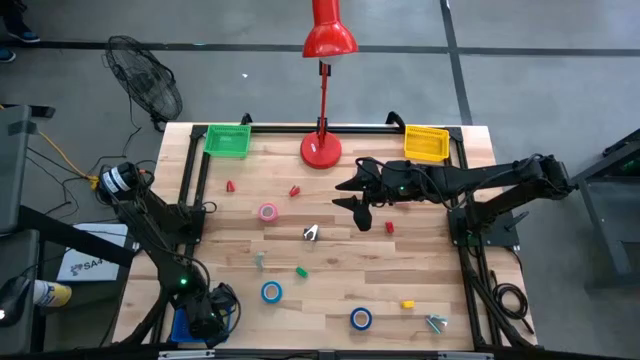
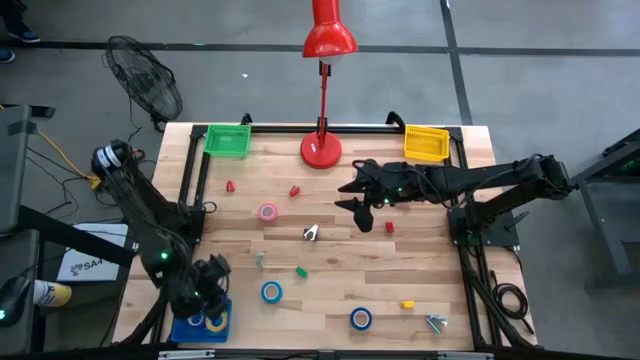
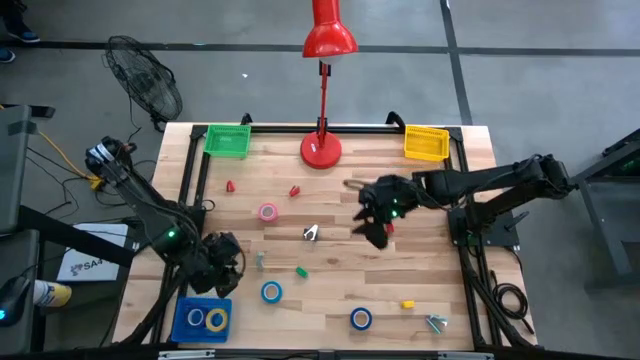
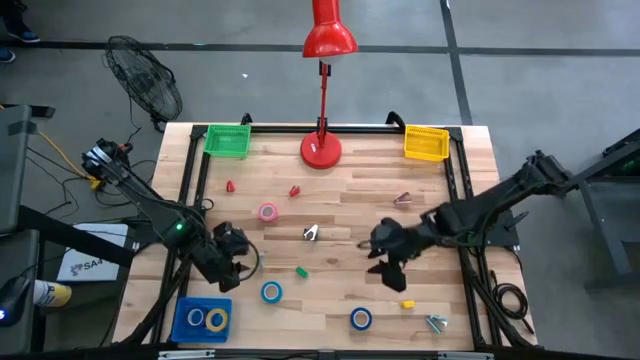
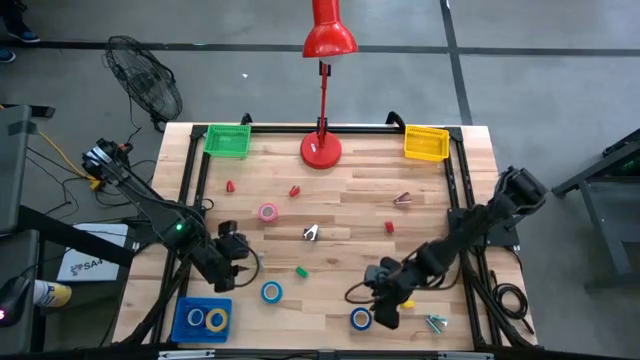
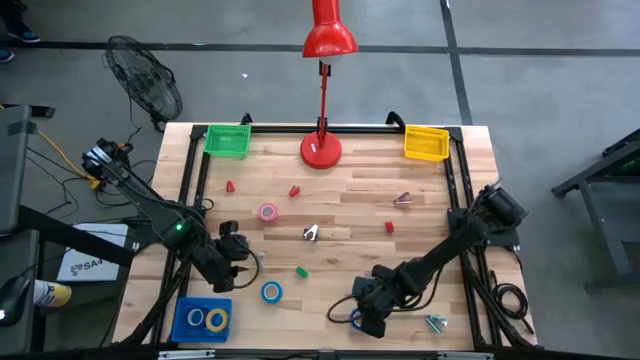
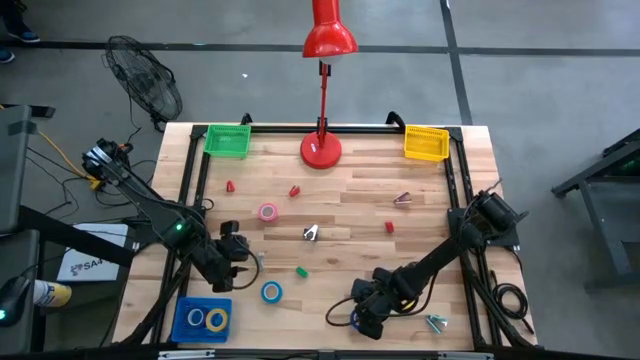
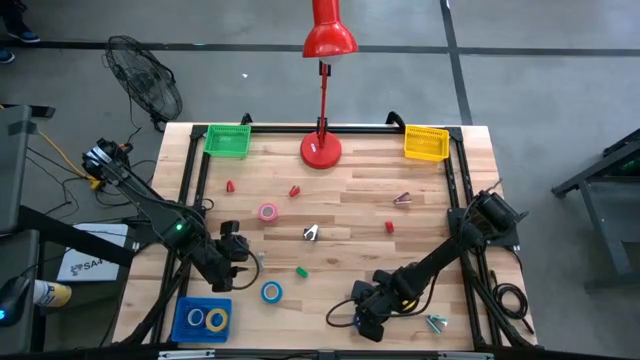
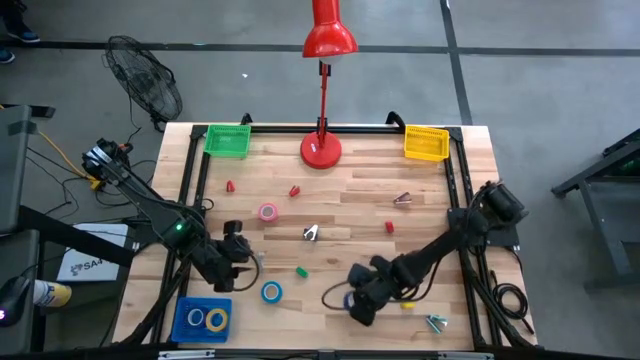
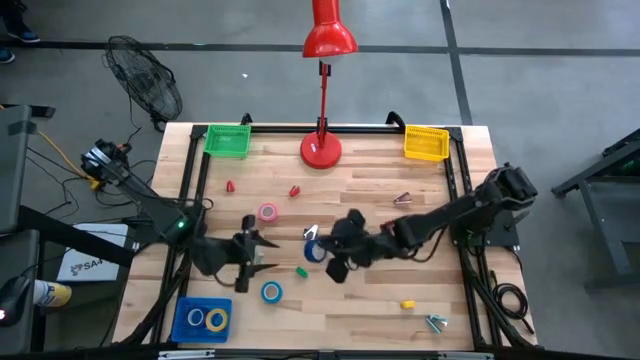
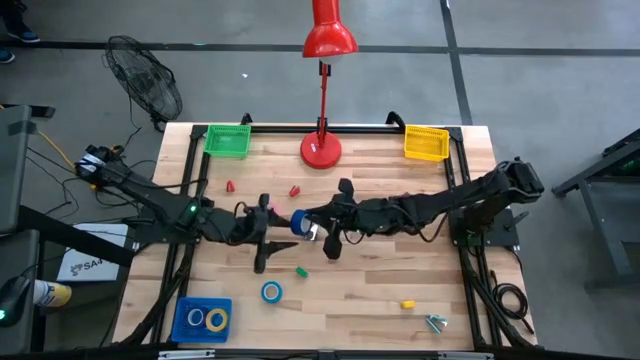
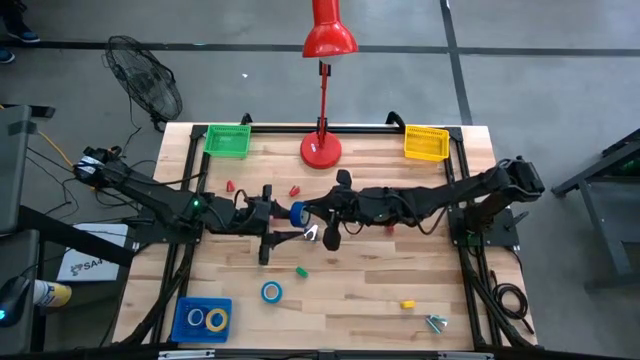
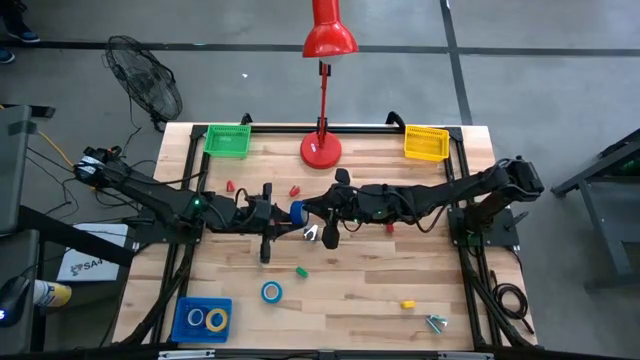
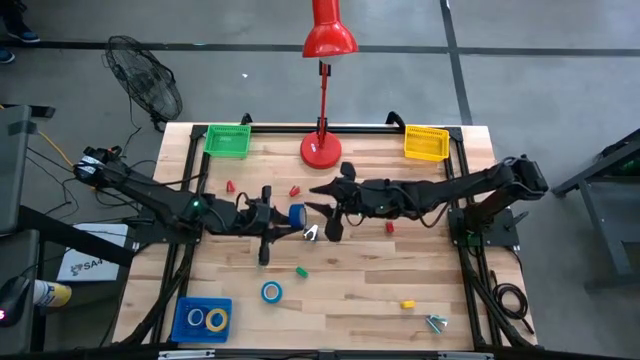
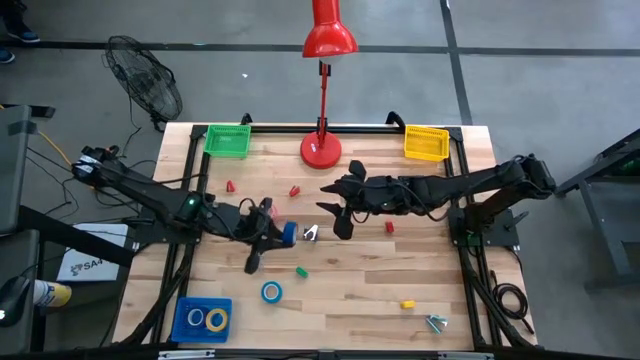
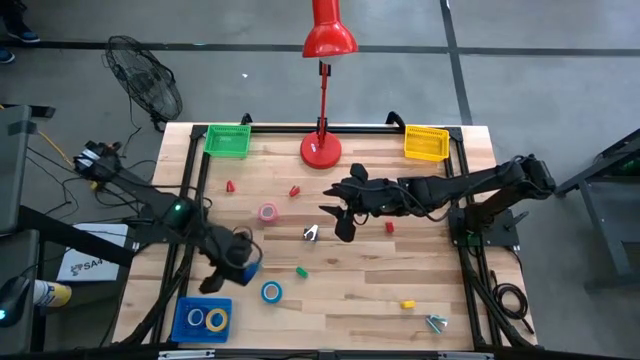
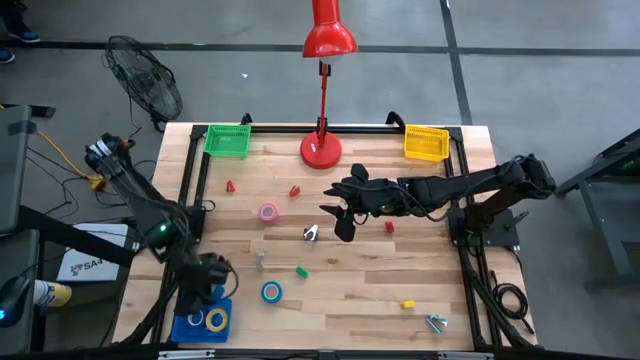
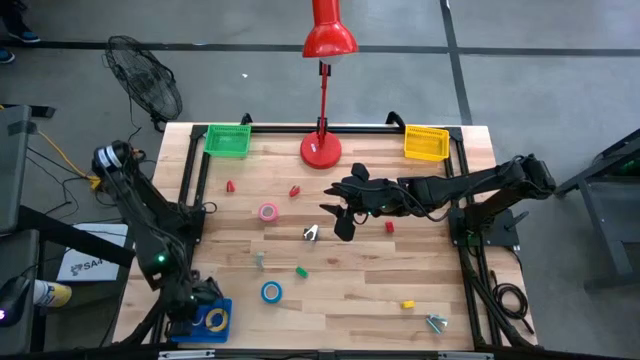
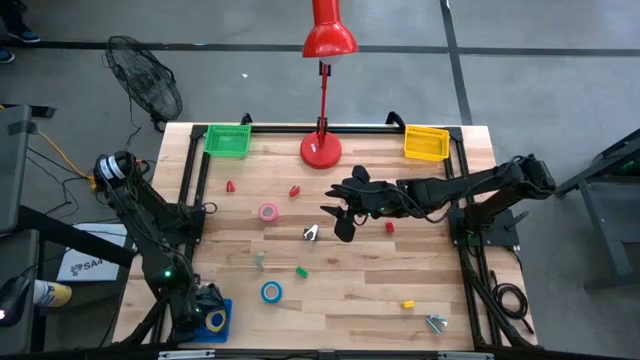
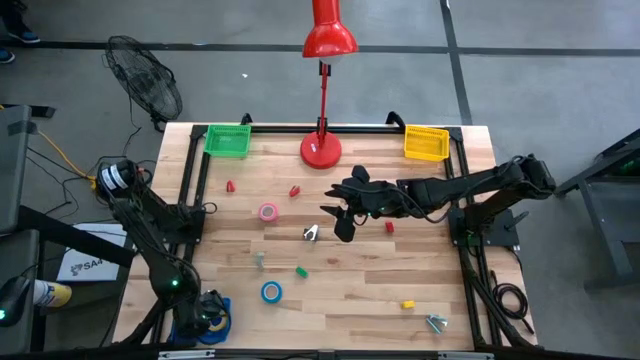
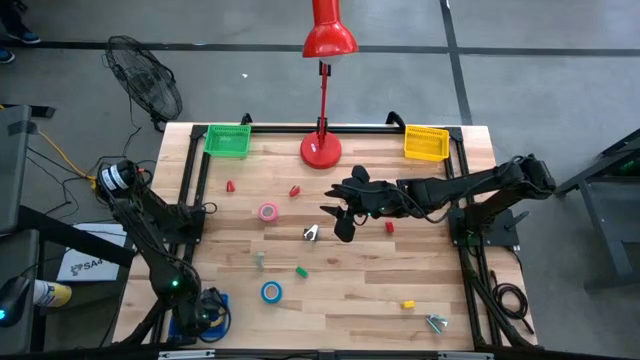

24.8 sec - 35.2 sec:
Task: Pick and place Stapler, Stapler remover, tape
Put the blue tape into the blue basket

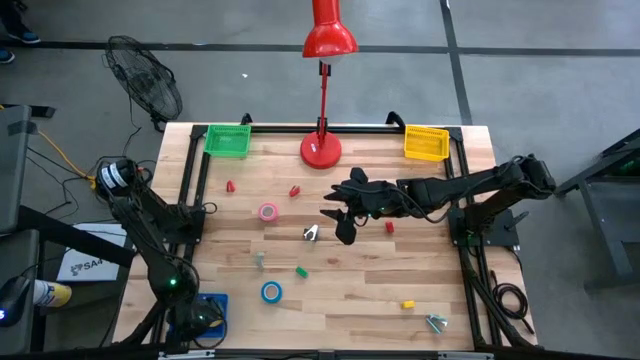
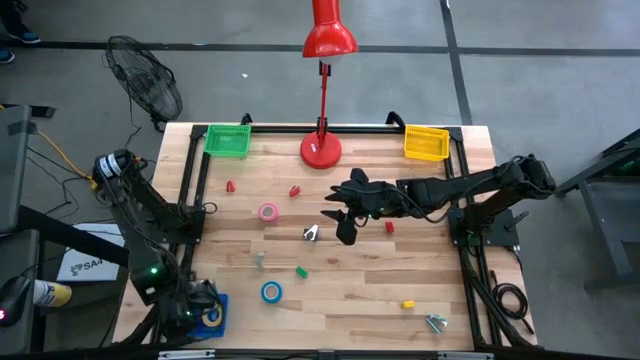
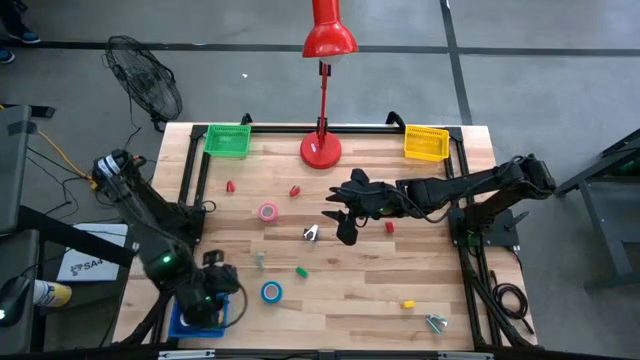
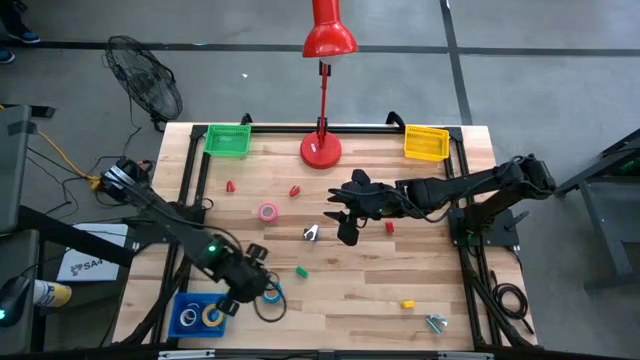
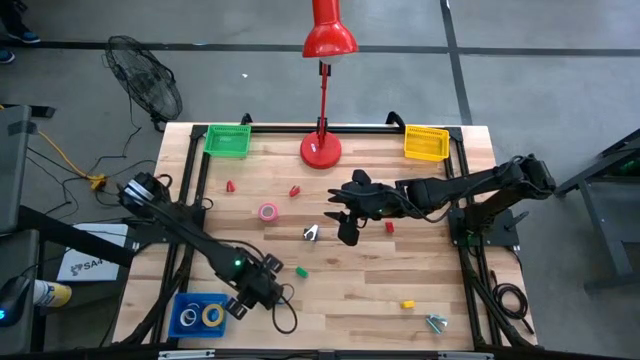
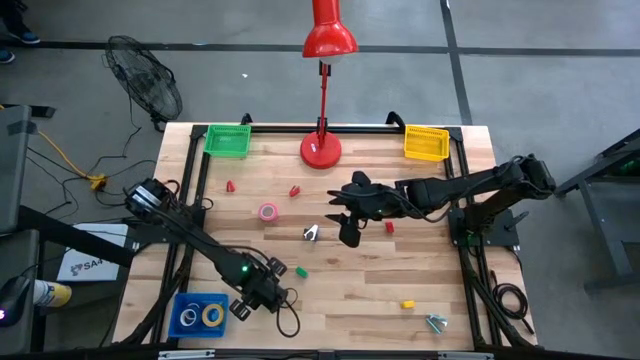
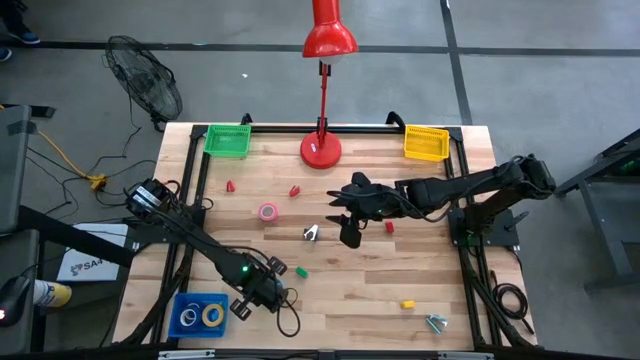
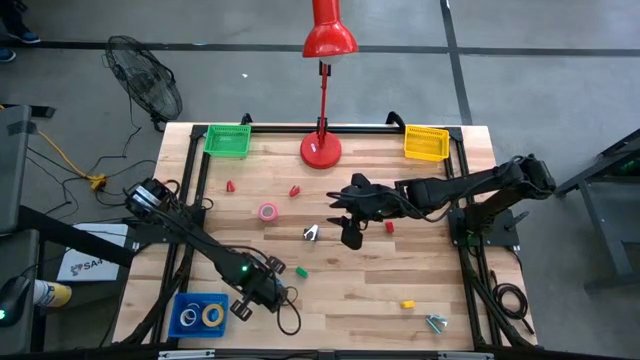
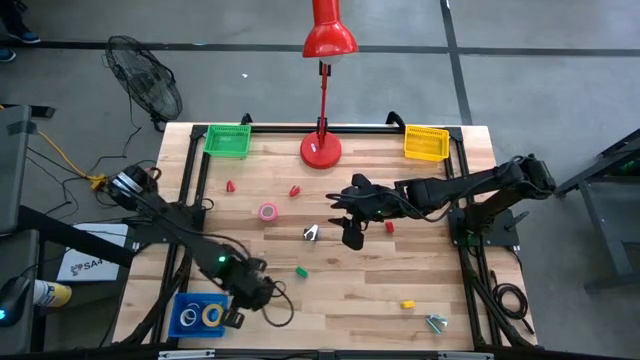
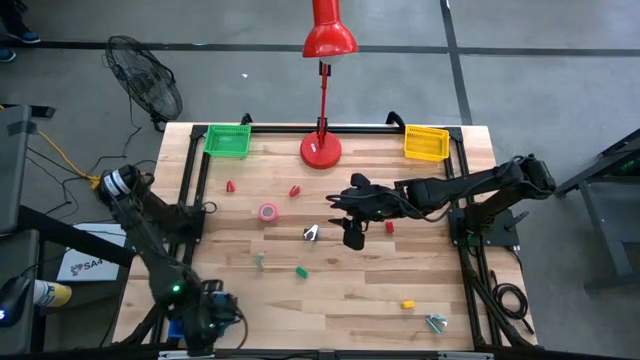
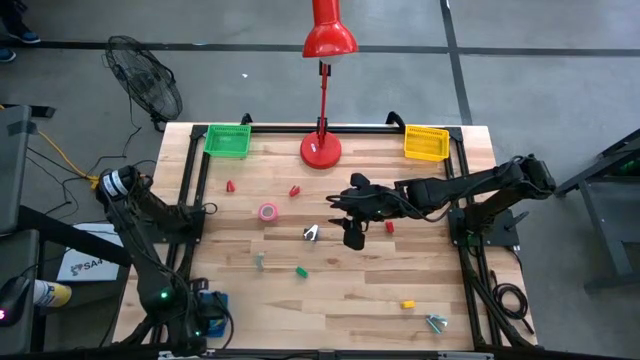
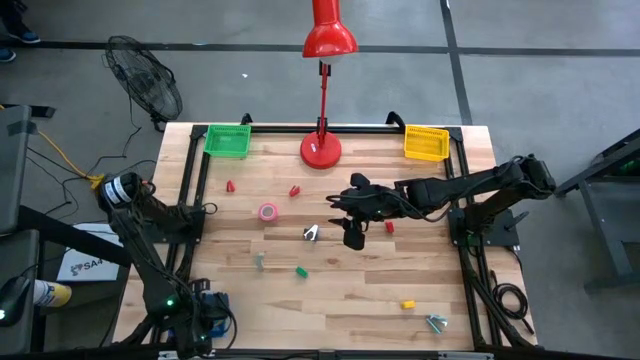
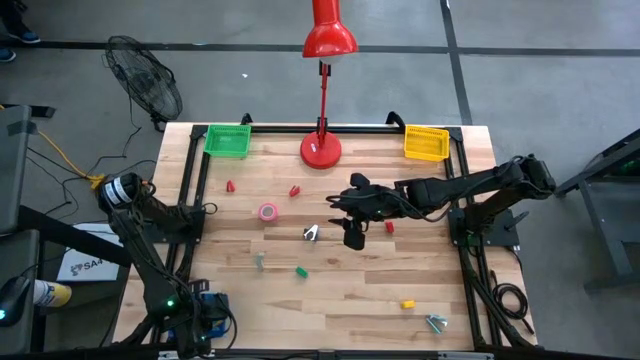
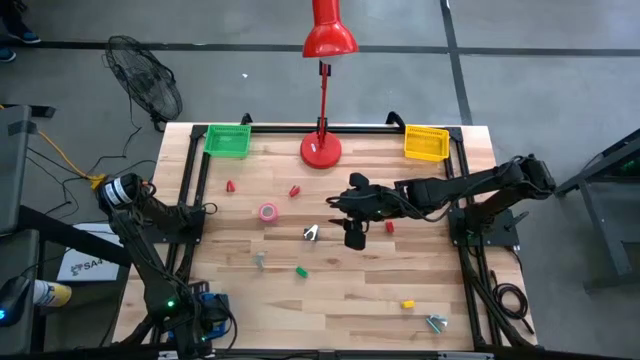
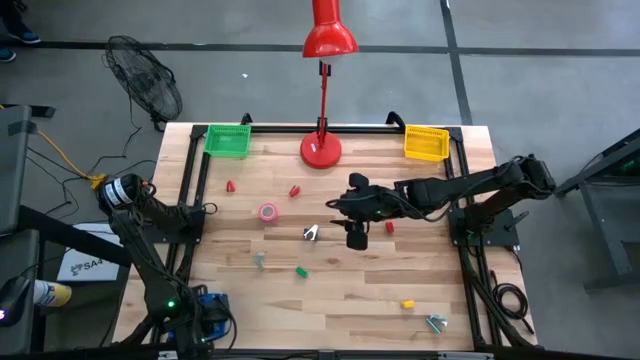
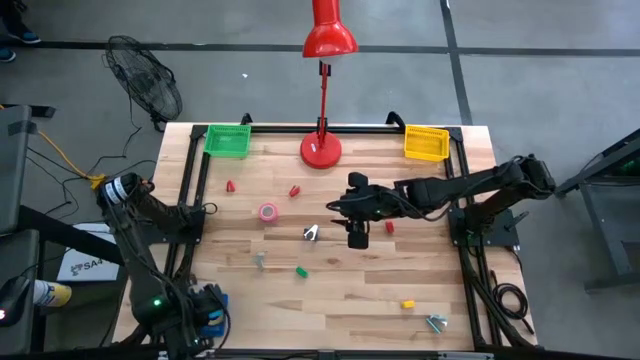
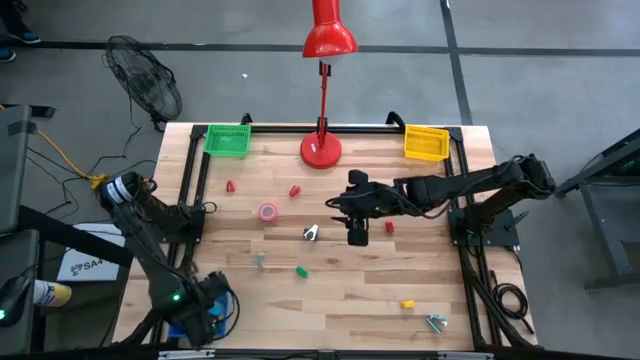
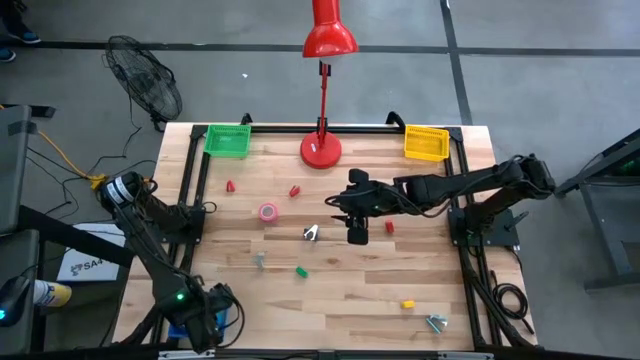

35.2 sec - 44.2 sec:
Put the light blue tape into the blue basket

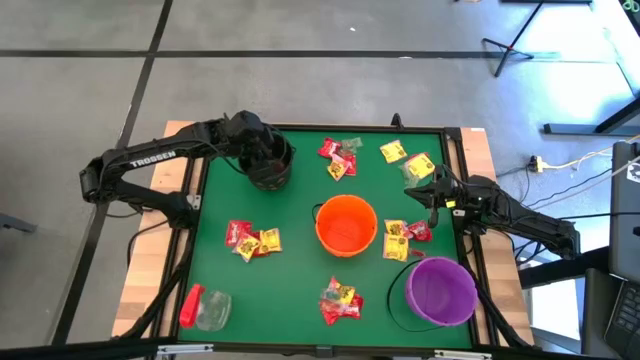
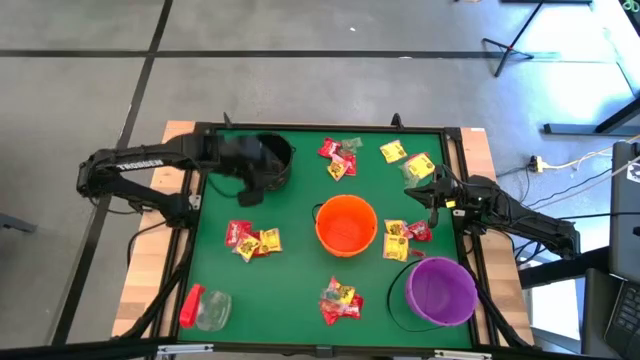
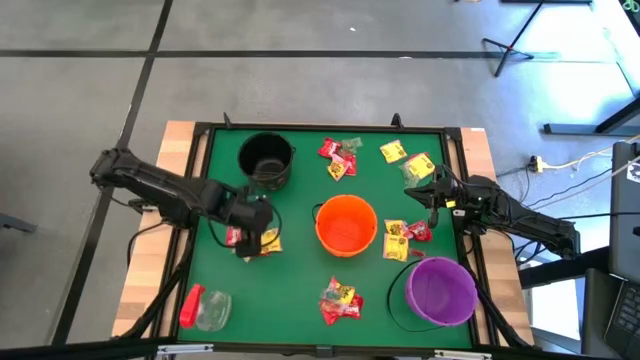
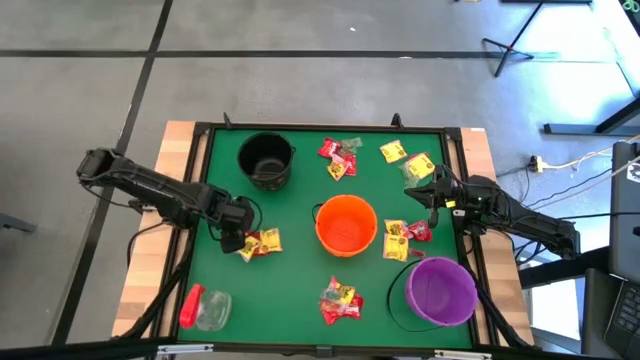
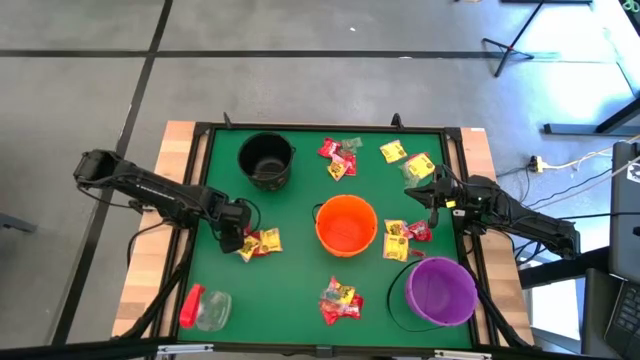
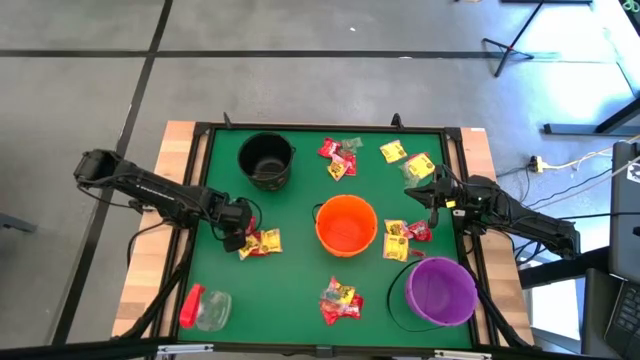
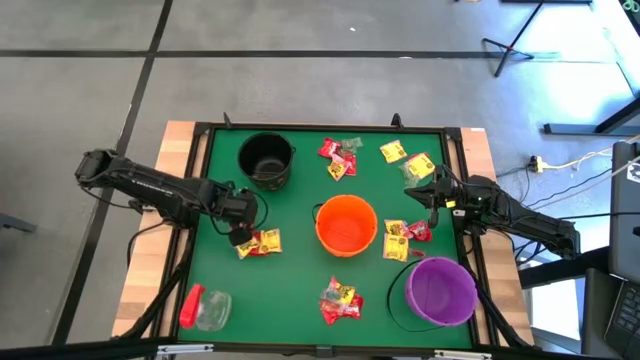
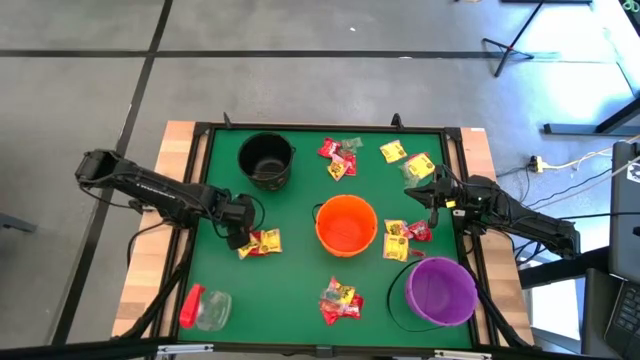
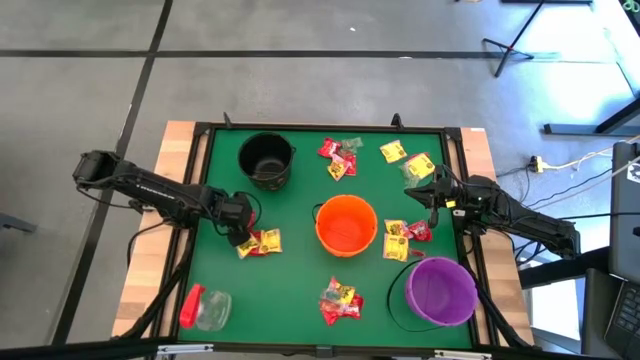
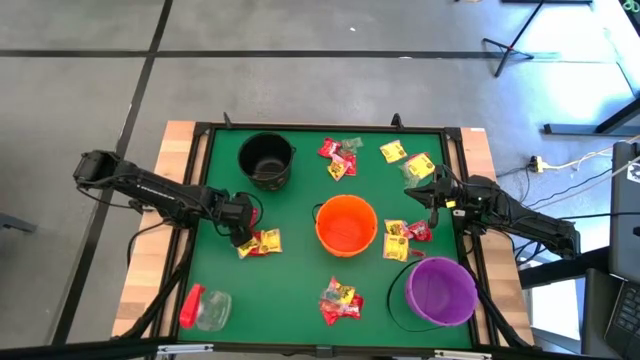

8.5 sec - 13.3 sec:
Task: Sort candy
Put the red candy into the orange bin
